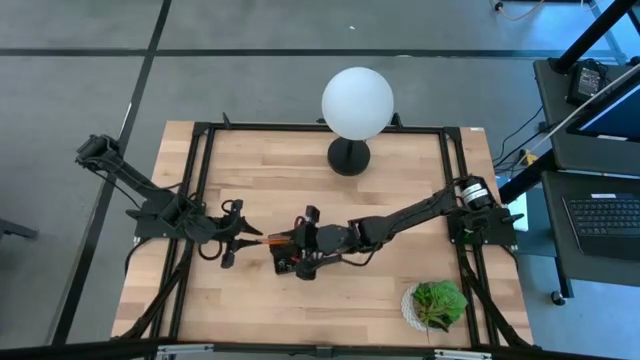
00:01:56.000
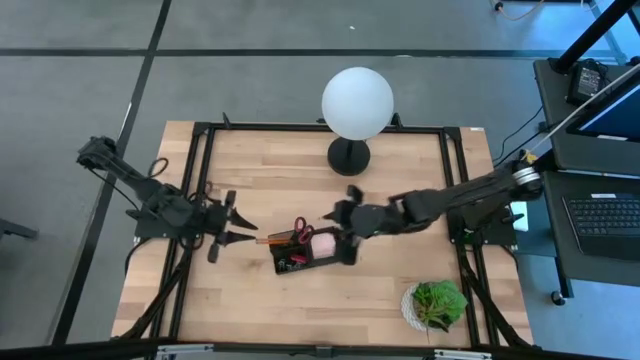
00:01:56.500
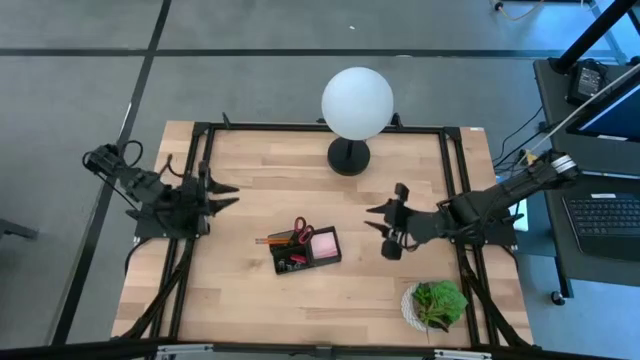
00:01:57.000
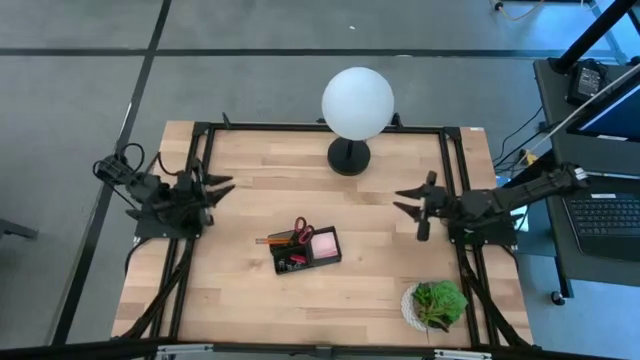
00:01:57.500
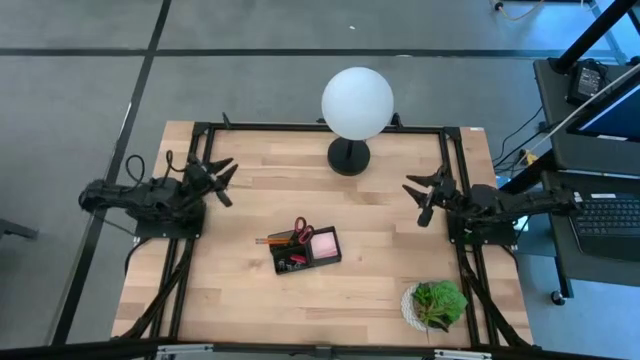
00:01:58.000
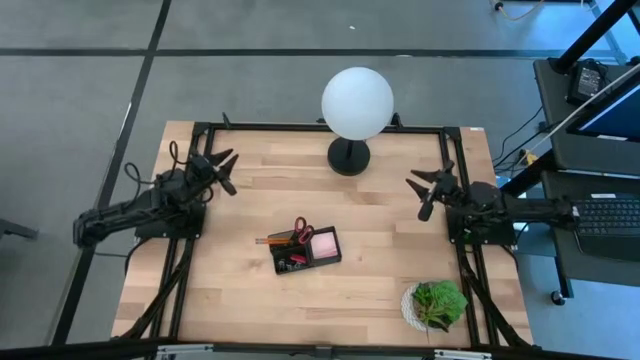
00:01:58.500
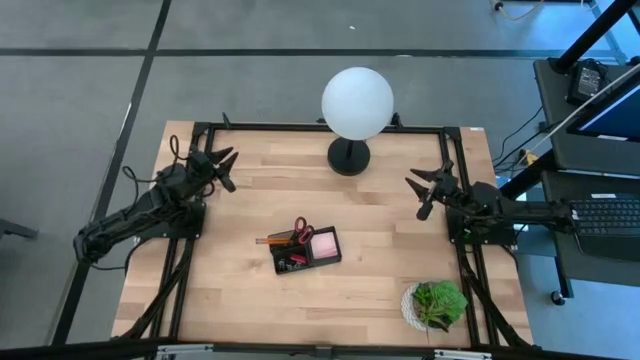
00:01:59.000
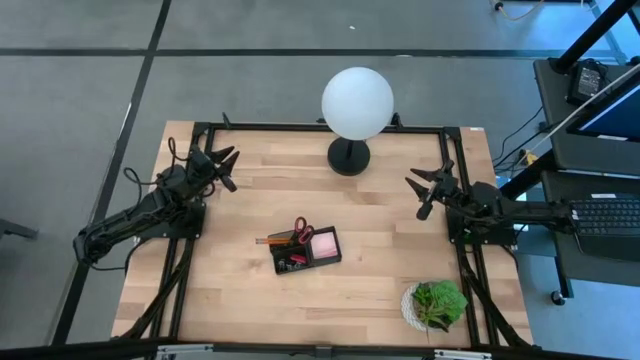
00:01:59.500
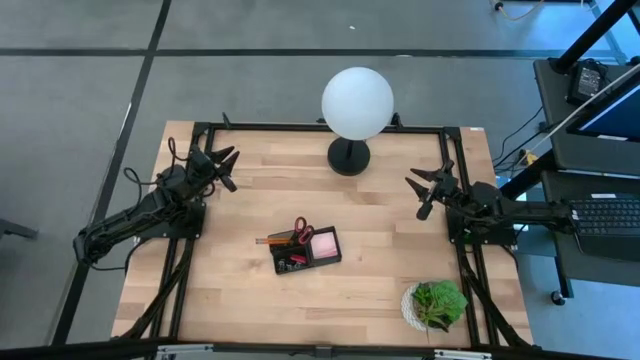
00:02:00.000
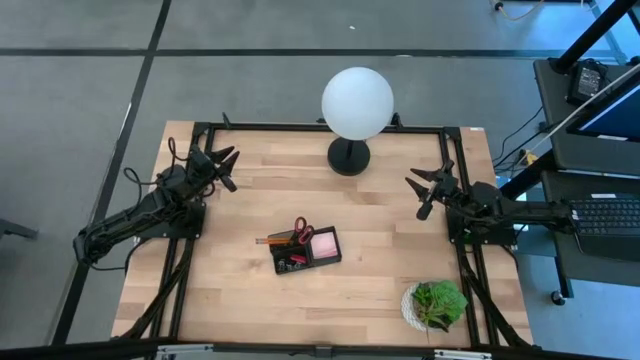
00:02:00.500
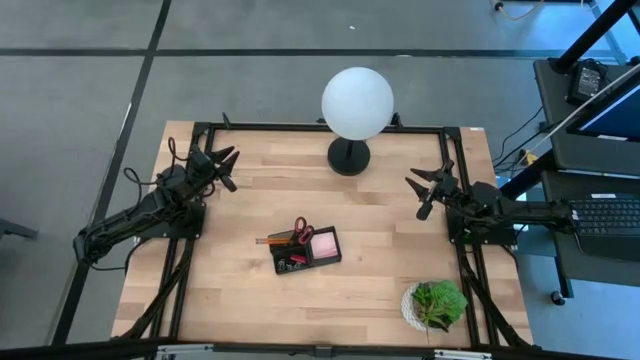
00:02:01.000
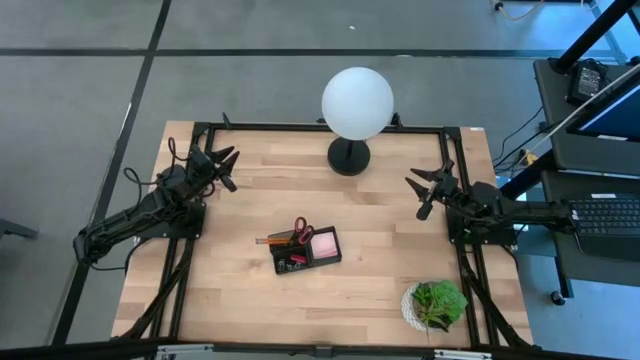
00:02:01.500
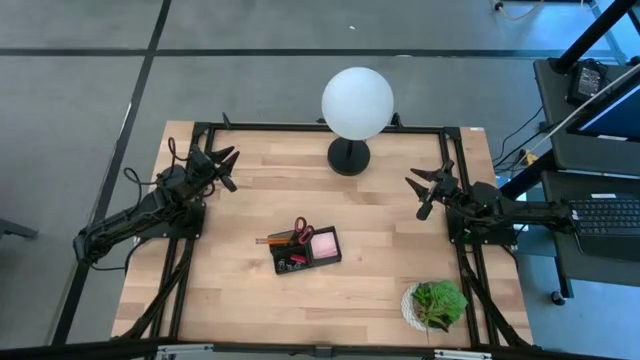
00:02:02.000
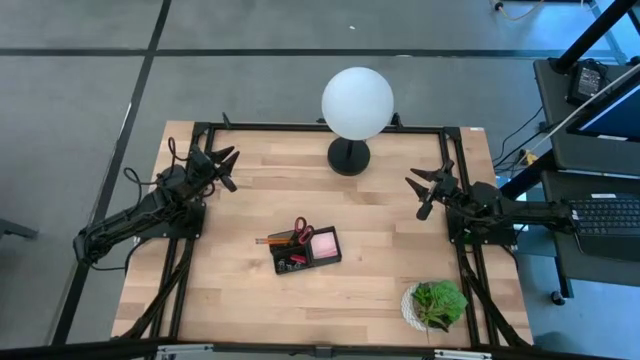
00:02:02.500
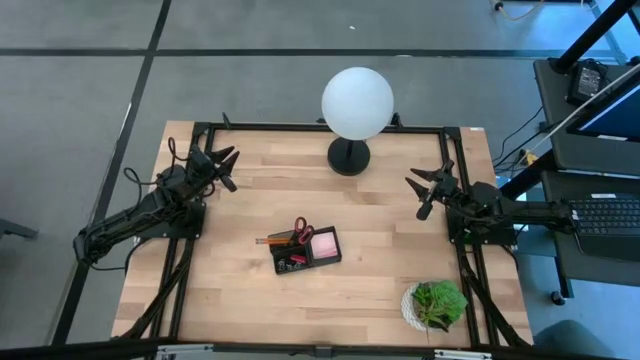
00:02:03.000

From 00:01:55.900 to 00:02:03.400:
Task: Pick and place office supplies into organizer
Return to Home Position

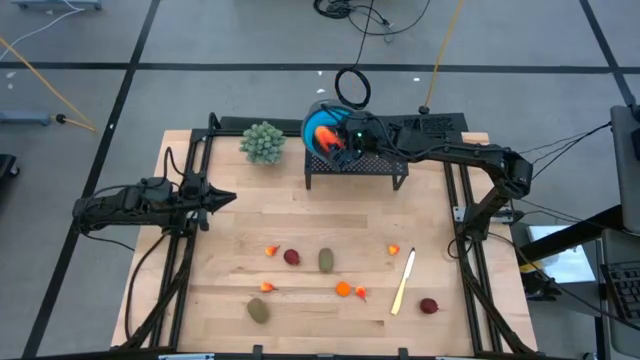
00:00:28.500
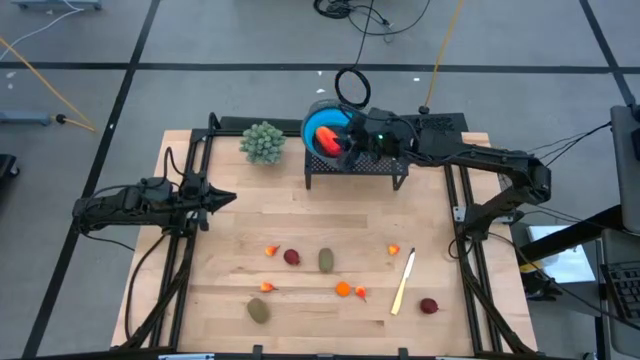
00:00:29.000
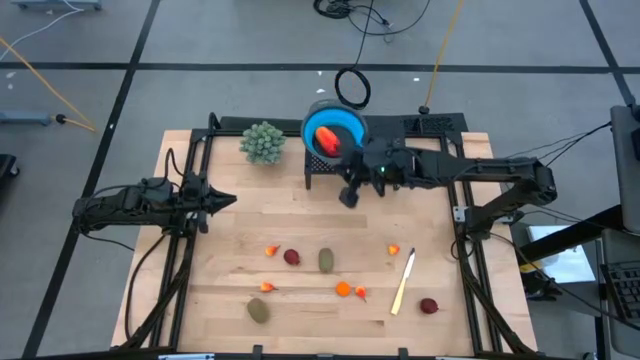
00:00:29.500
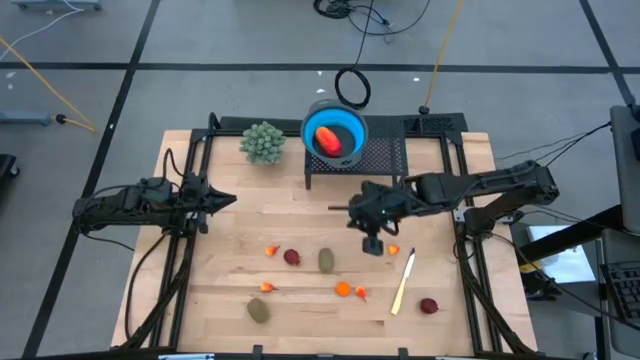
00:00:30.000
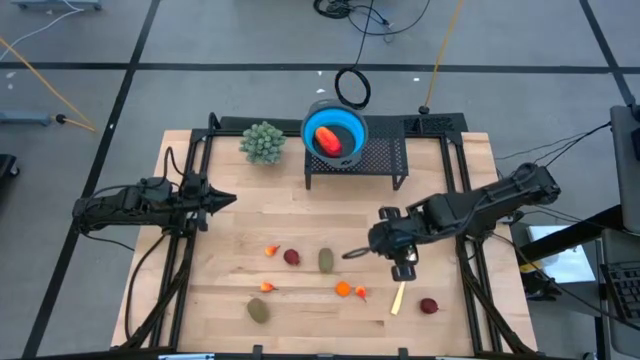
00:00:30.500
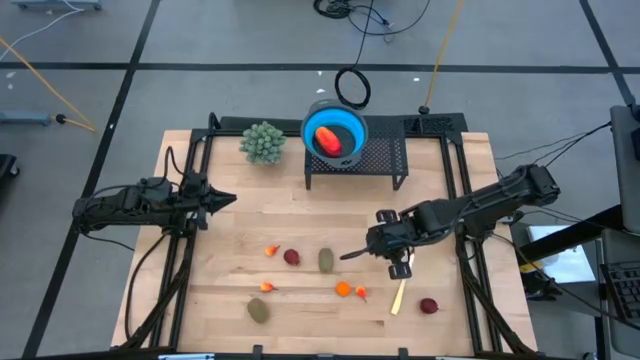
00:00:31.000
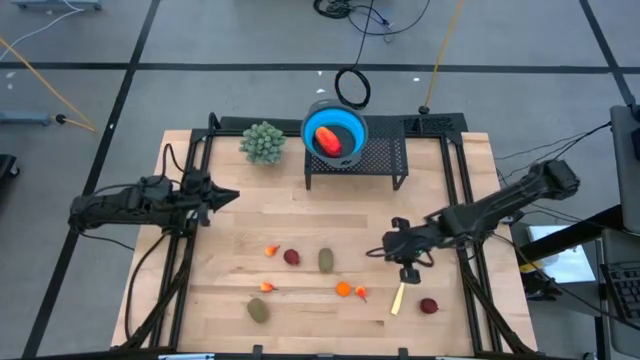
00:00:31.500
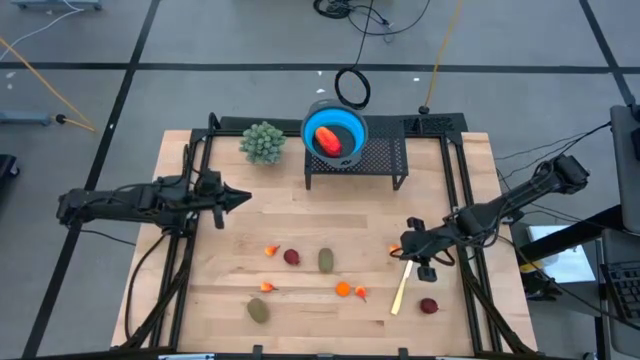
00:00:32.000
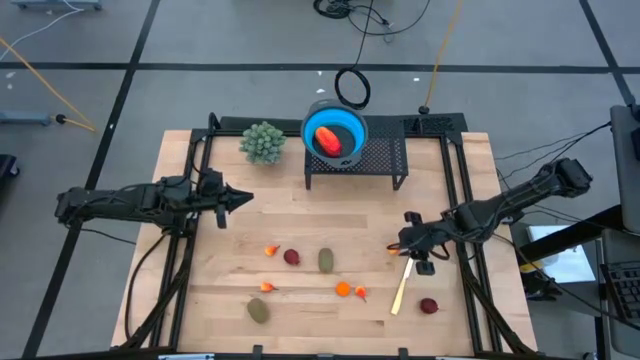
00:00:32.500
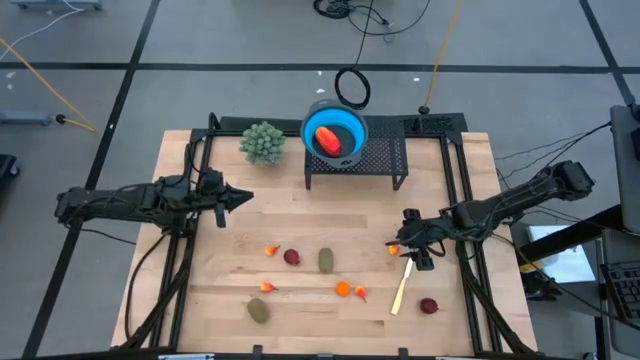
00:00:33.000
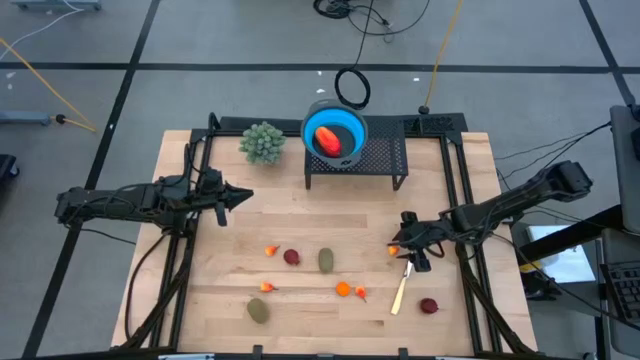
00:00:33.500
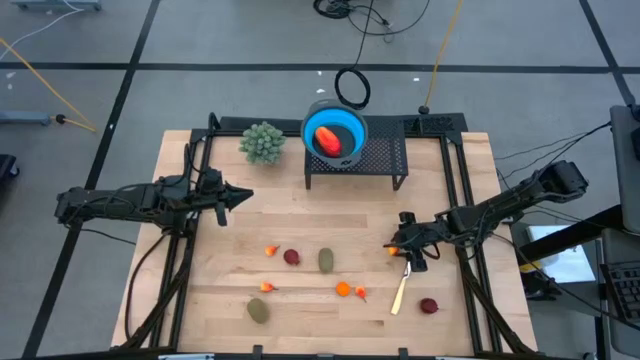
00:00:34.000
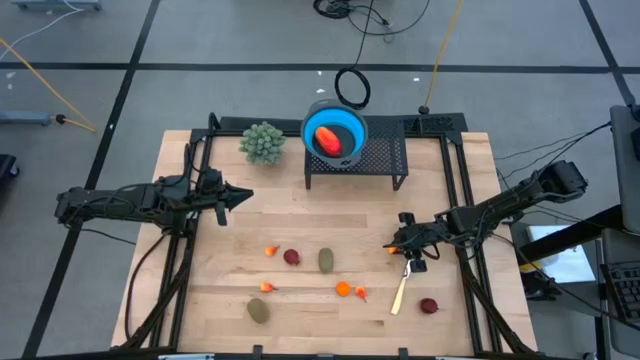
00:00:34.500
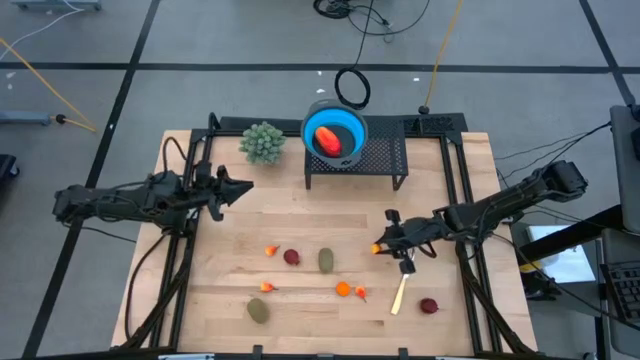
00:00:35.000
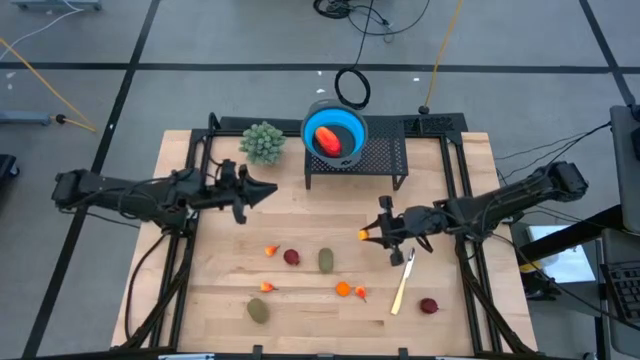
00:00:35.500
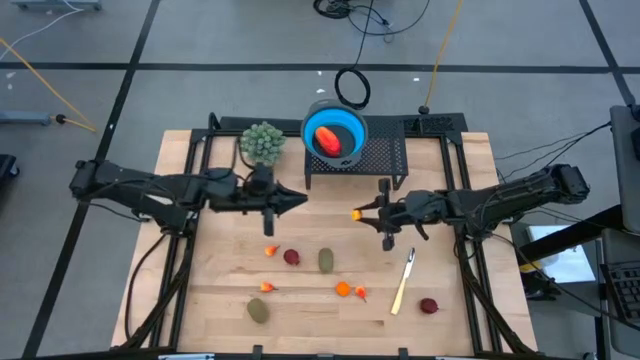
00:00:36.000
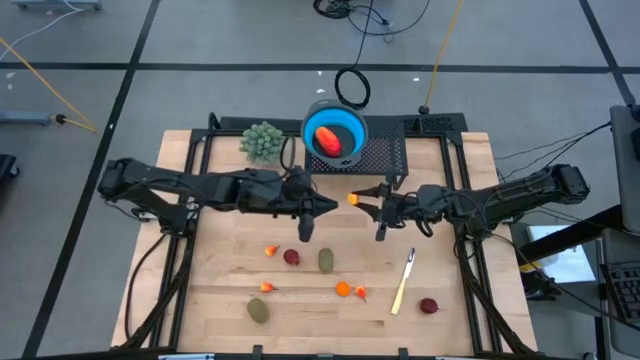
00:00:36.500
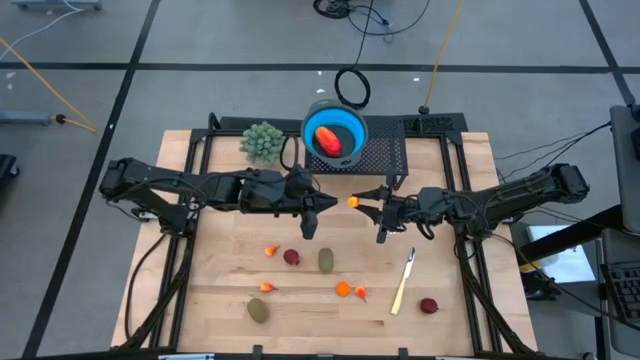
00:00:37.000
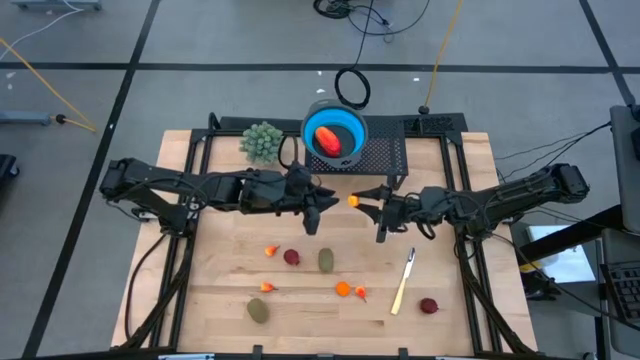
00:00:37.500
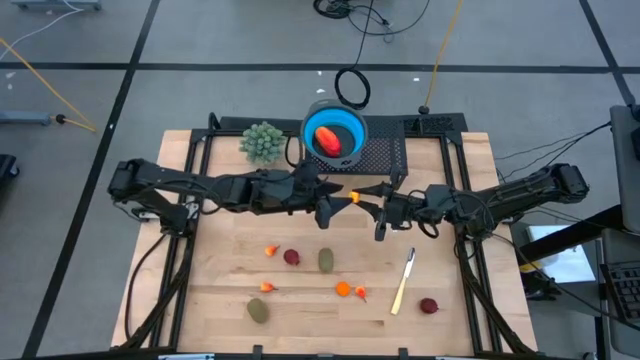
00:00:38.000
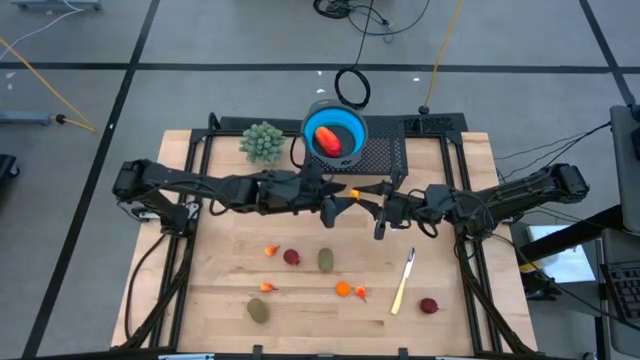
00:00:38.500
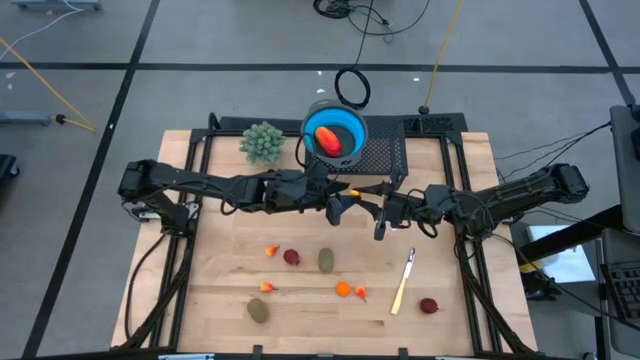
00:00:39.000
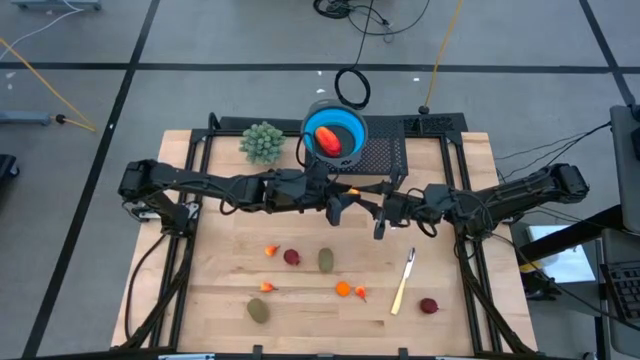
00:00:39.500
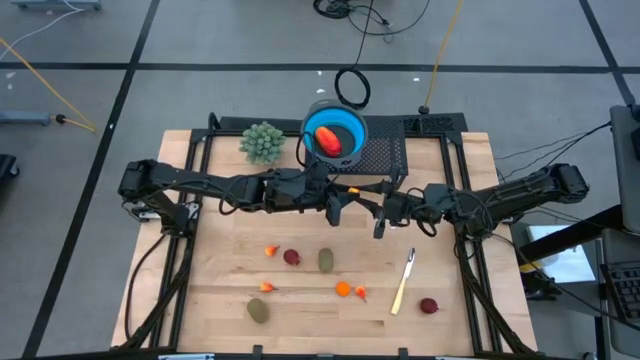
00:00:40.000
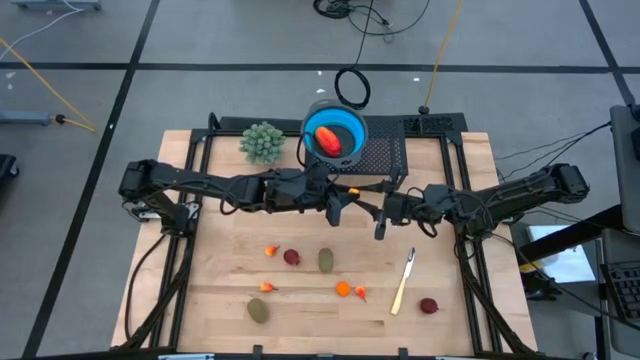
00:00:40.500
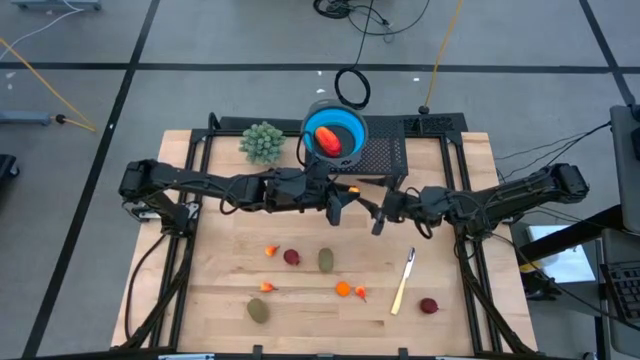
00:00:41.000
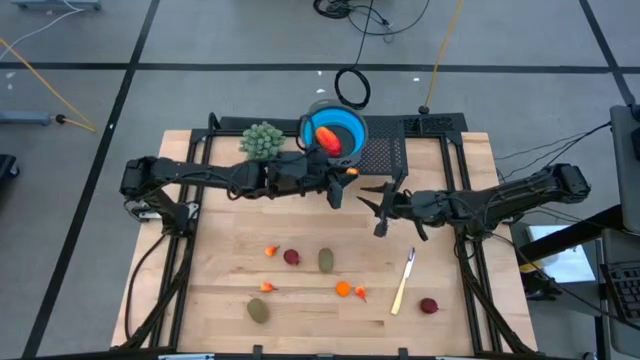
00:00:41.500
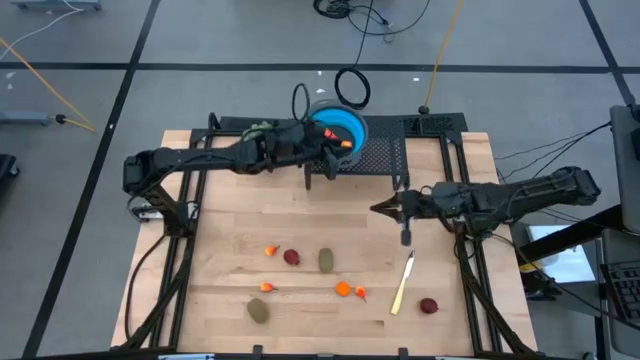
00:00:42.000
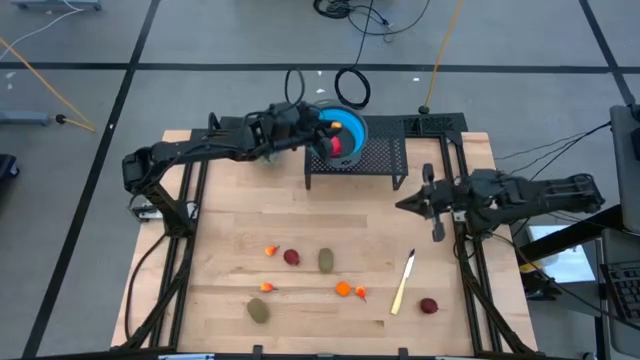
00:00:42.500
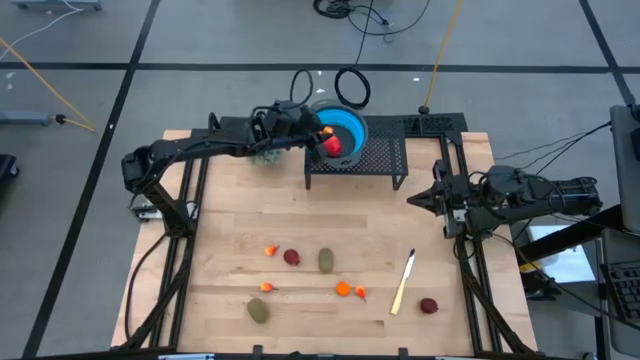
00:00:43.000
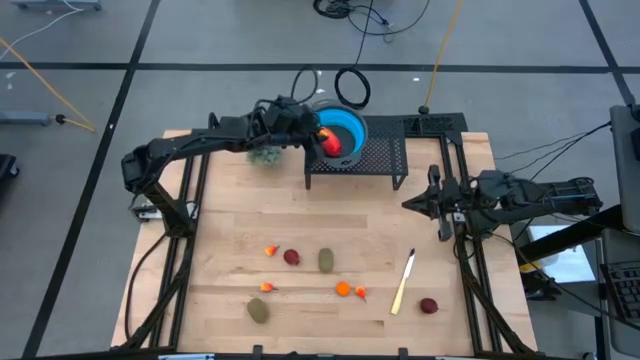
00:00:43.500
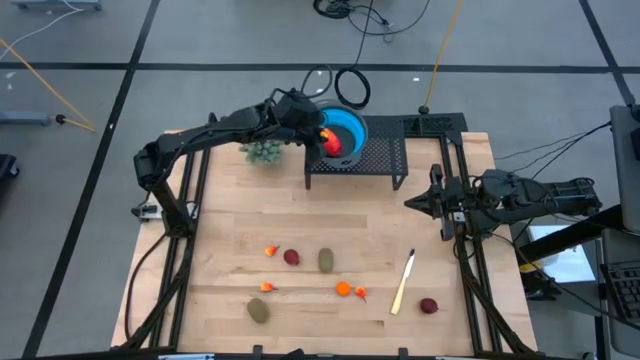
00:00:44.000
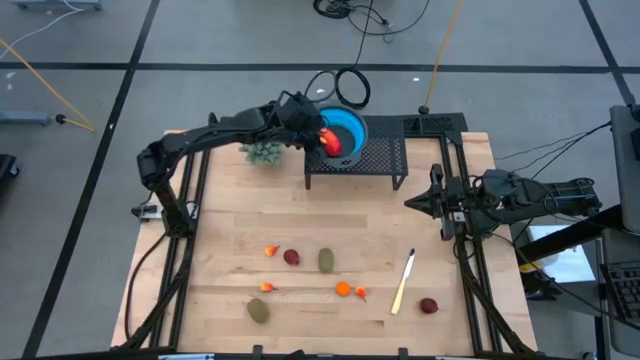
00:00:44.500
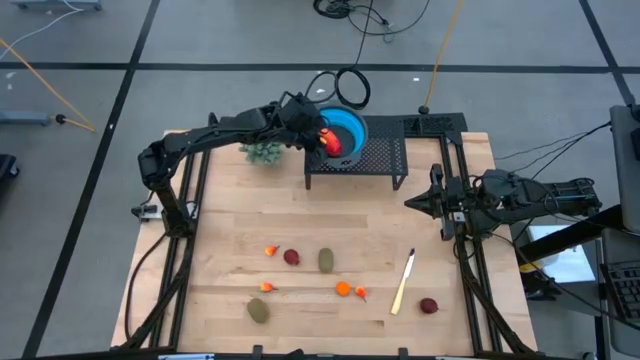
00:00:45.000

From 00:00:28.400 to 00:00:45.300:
Task: Pick & Place Fruit
Put the peach into the blue strainer on the shelf
